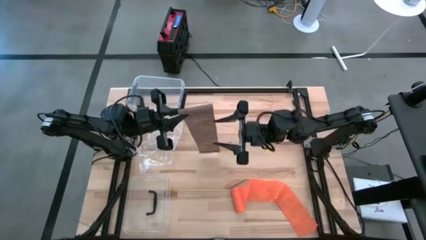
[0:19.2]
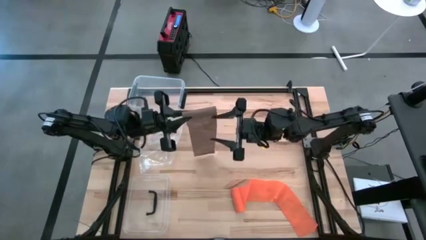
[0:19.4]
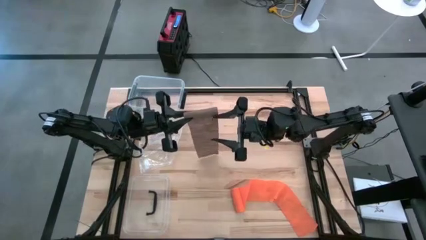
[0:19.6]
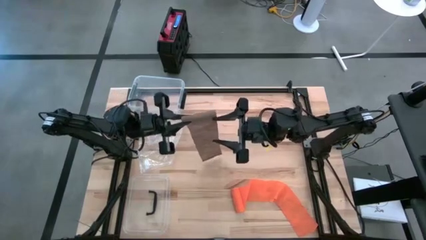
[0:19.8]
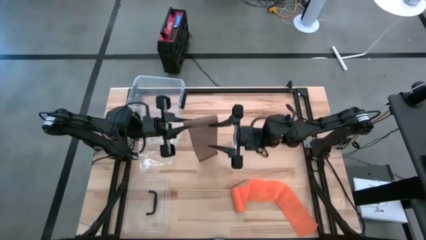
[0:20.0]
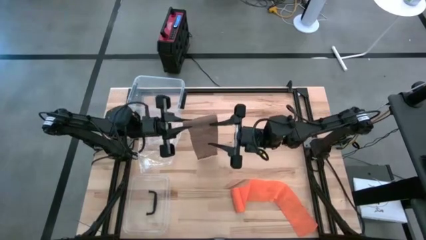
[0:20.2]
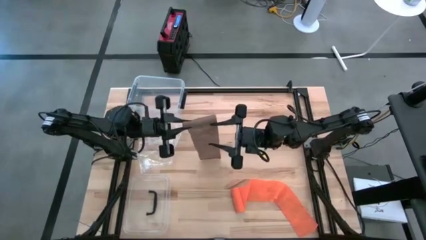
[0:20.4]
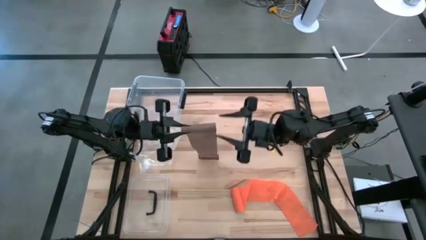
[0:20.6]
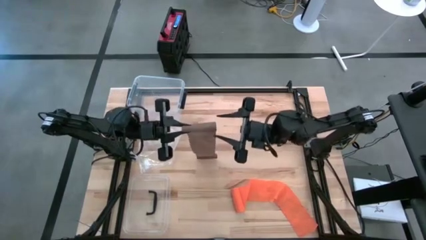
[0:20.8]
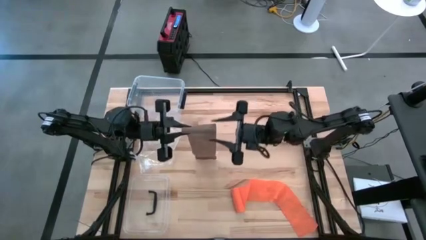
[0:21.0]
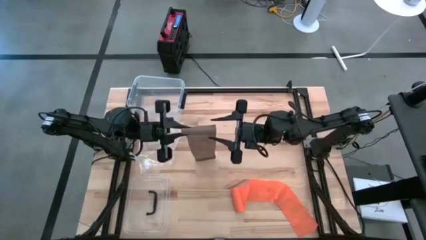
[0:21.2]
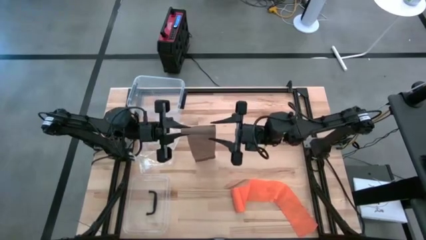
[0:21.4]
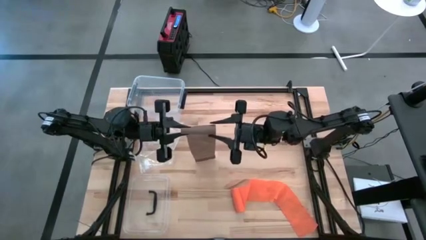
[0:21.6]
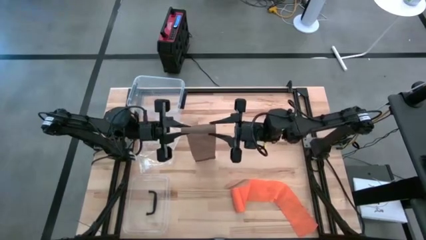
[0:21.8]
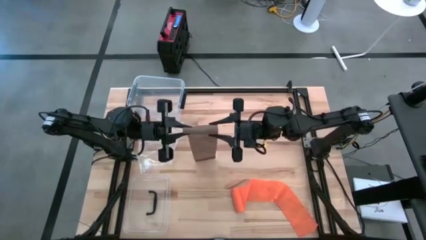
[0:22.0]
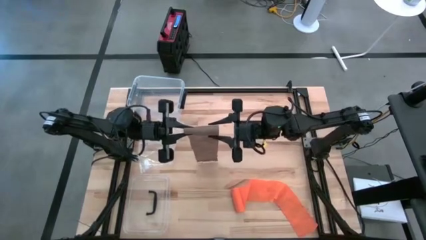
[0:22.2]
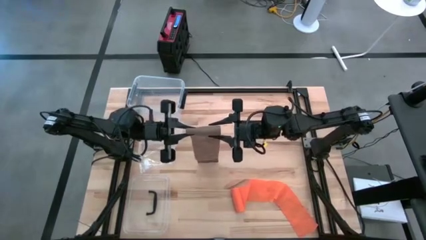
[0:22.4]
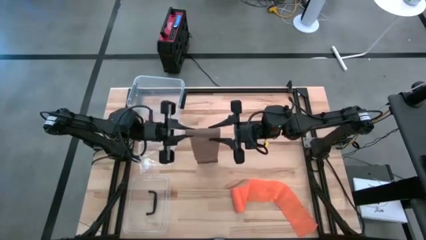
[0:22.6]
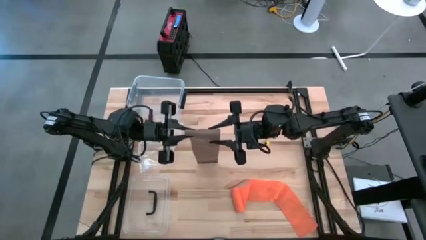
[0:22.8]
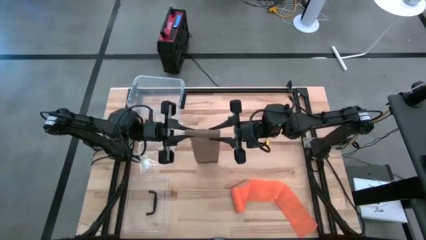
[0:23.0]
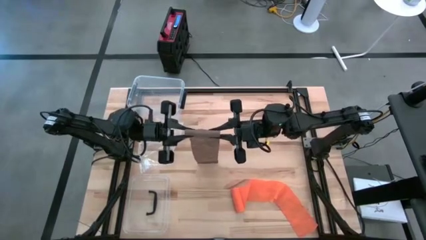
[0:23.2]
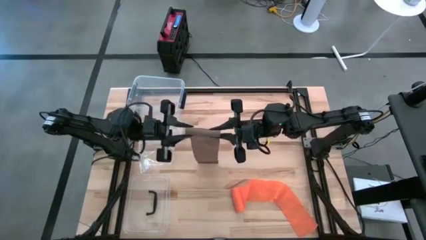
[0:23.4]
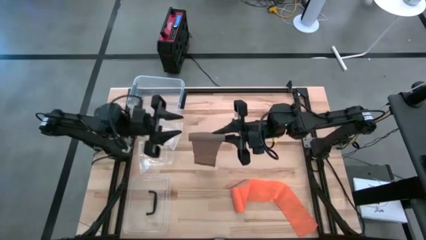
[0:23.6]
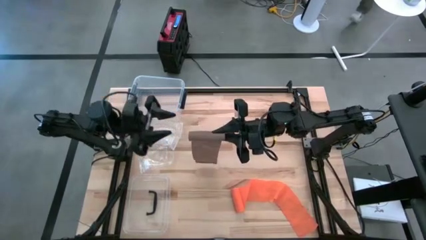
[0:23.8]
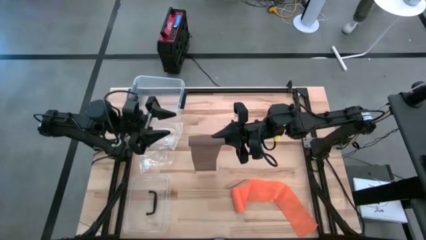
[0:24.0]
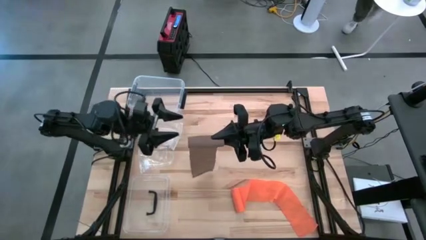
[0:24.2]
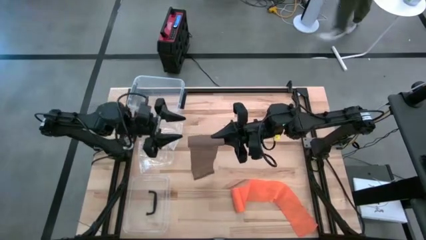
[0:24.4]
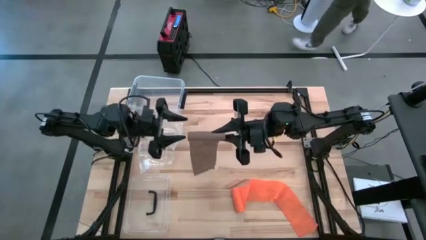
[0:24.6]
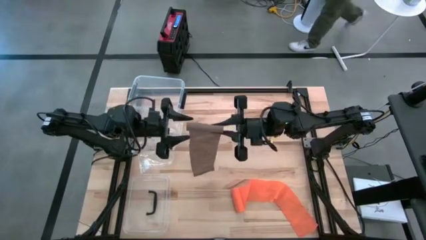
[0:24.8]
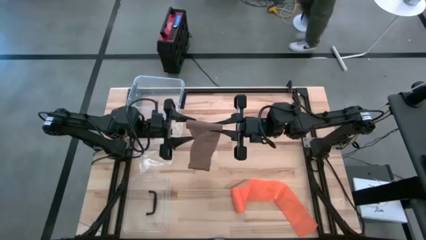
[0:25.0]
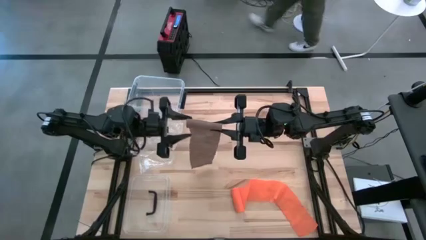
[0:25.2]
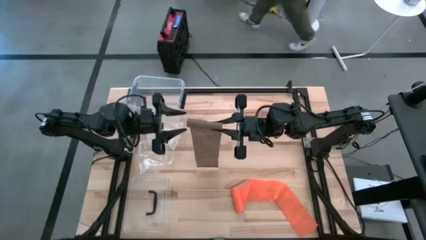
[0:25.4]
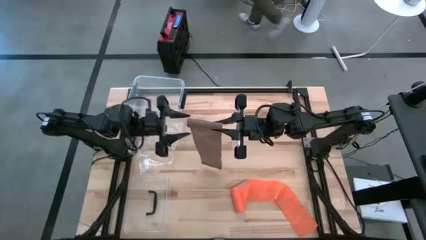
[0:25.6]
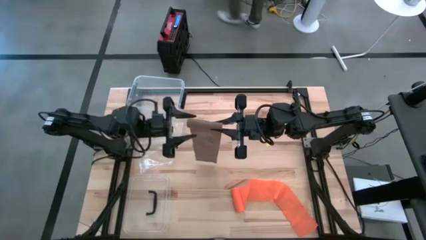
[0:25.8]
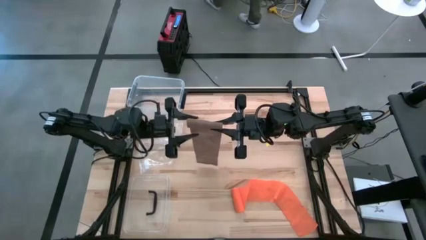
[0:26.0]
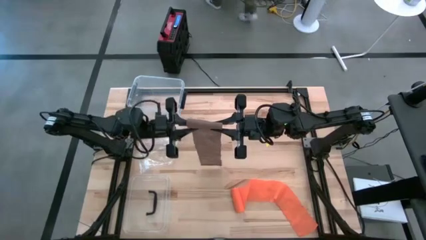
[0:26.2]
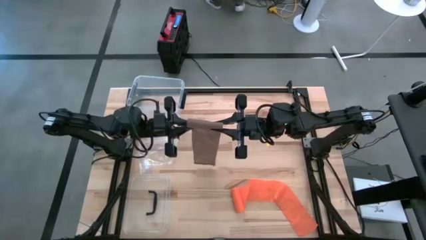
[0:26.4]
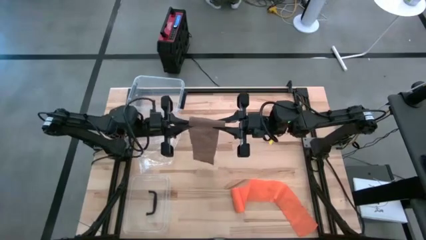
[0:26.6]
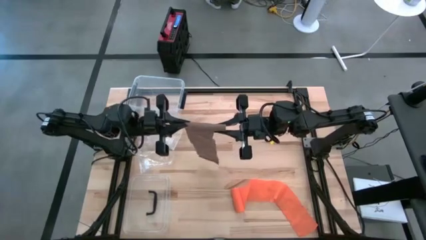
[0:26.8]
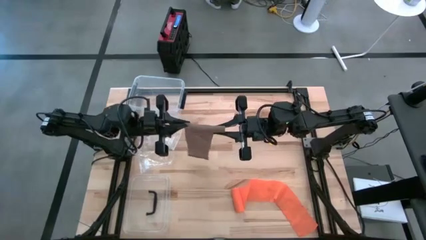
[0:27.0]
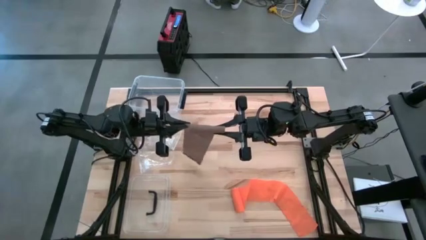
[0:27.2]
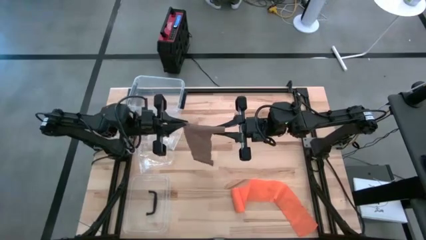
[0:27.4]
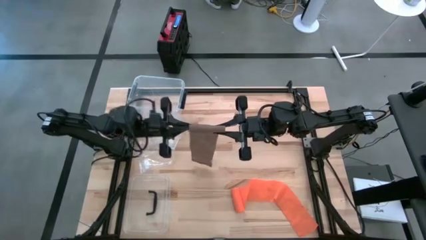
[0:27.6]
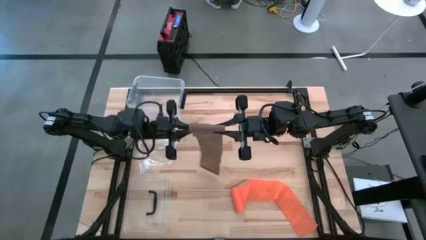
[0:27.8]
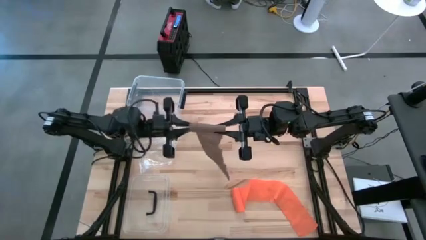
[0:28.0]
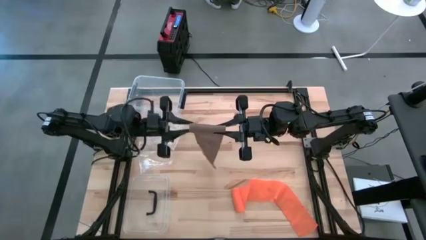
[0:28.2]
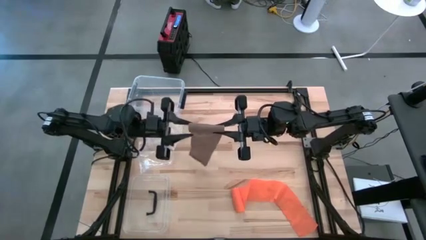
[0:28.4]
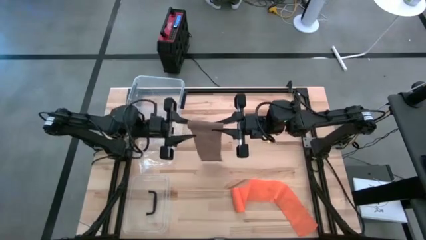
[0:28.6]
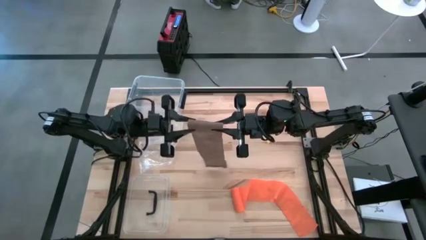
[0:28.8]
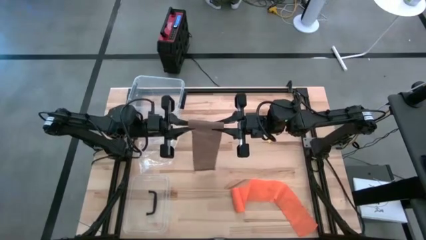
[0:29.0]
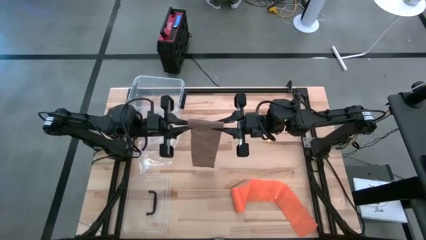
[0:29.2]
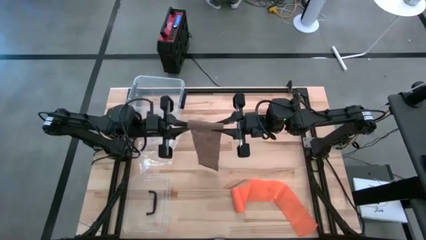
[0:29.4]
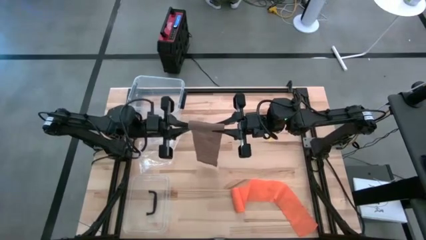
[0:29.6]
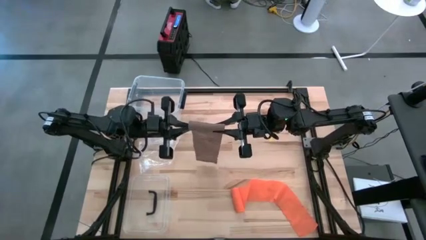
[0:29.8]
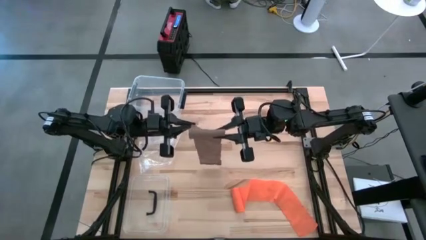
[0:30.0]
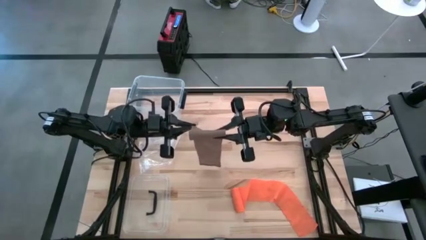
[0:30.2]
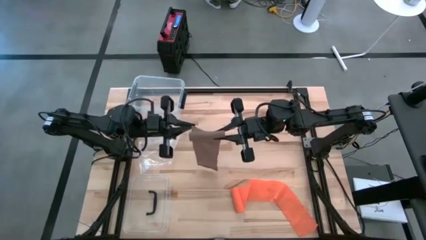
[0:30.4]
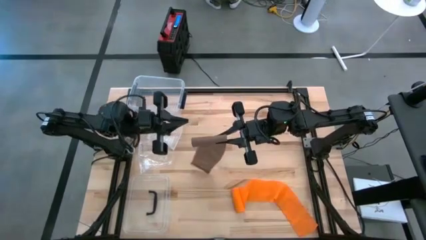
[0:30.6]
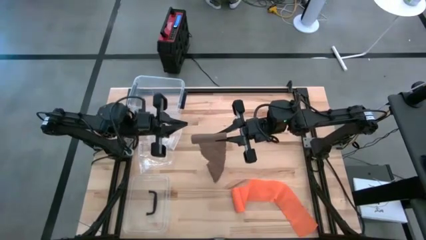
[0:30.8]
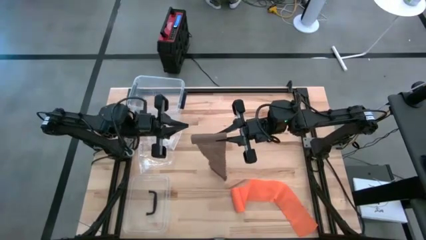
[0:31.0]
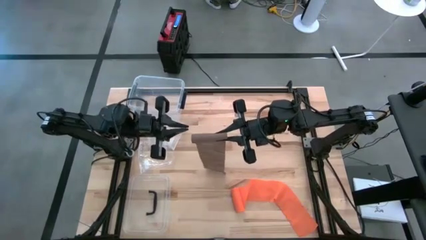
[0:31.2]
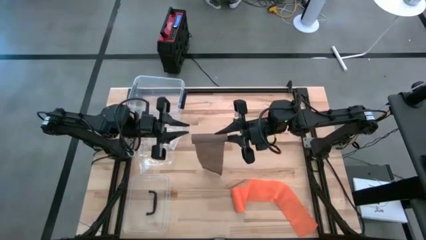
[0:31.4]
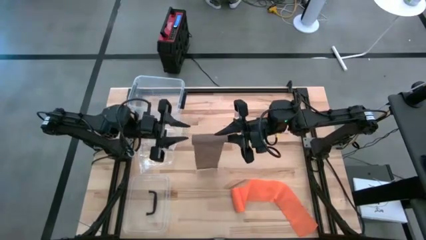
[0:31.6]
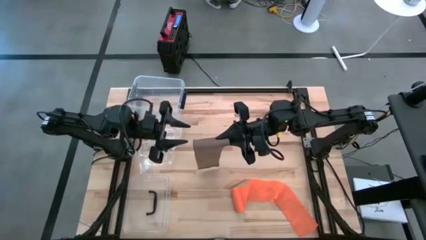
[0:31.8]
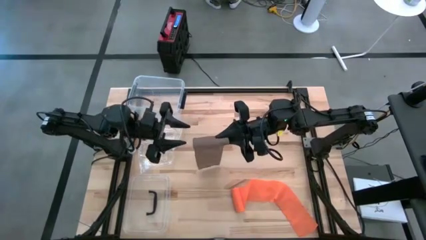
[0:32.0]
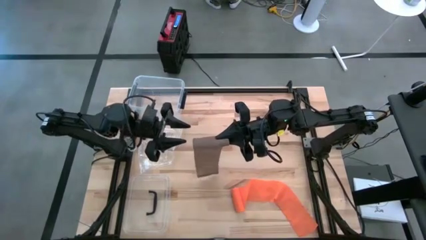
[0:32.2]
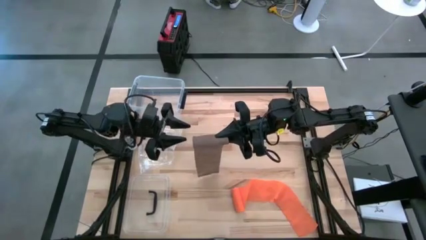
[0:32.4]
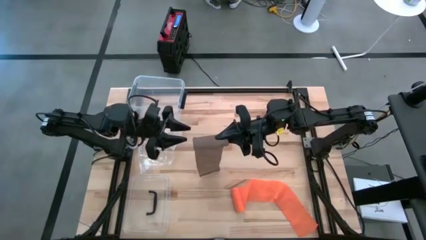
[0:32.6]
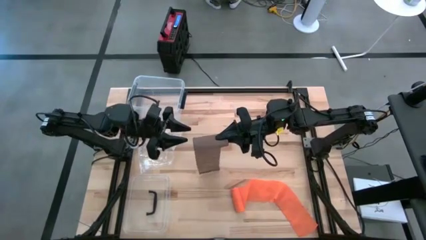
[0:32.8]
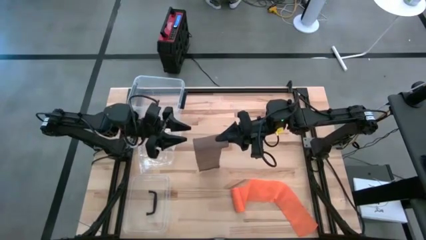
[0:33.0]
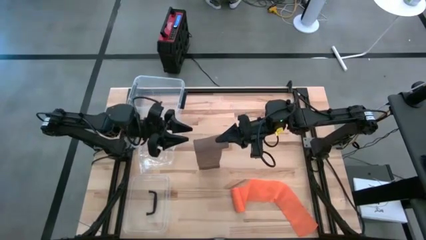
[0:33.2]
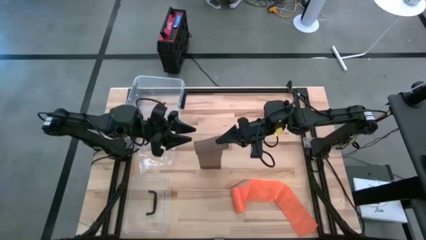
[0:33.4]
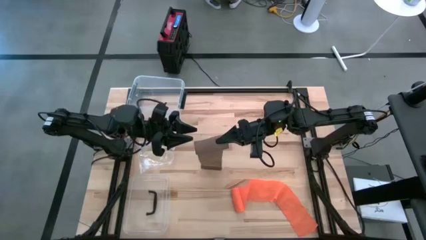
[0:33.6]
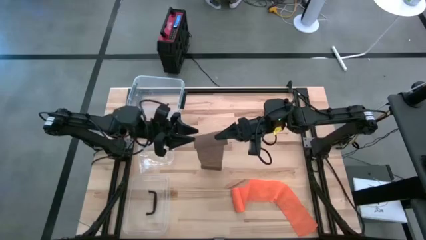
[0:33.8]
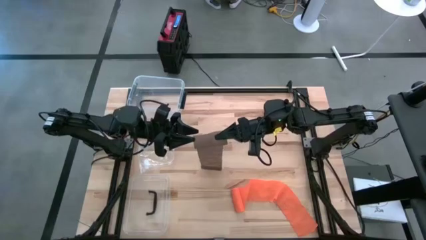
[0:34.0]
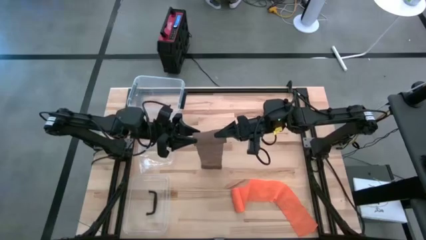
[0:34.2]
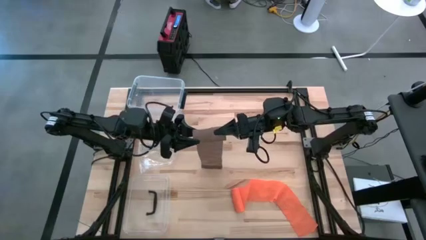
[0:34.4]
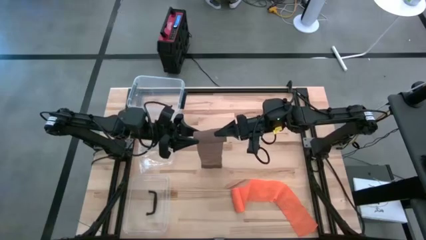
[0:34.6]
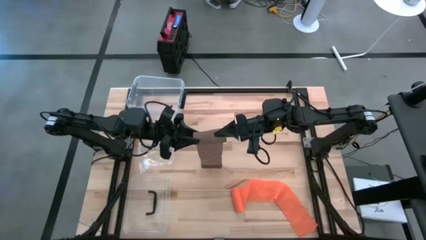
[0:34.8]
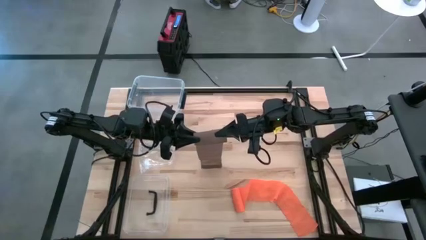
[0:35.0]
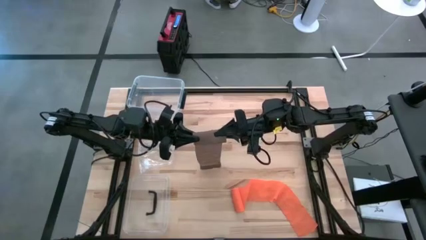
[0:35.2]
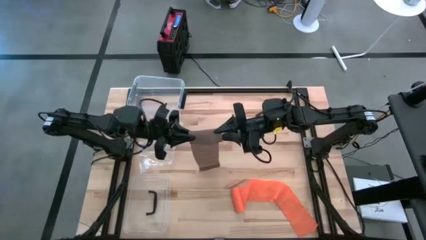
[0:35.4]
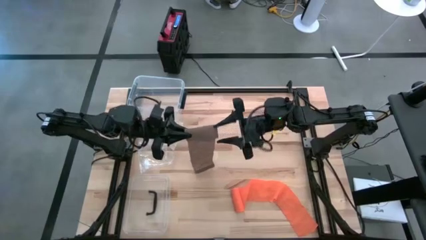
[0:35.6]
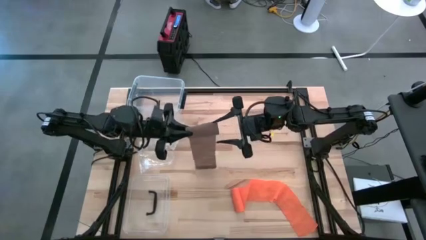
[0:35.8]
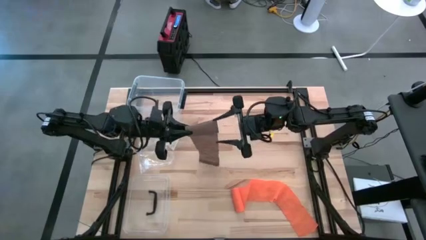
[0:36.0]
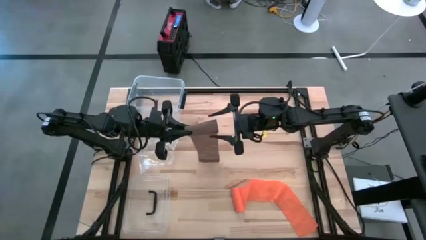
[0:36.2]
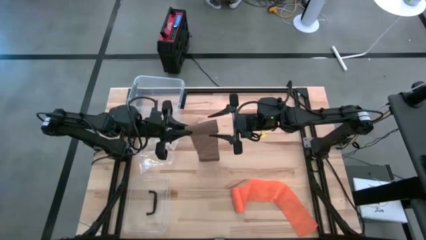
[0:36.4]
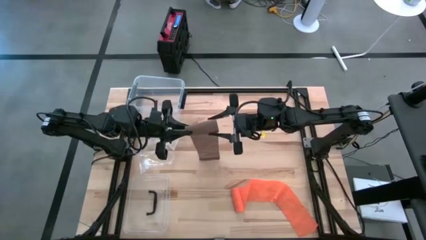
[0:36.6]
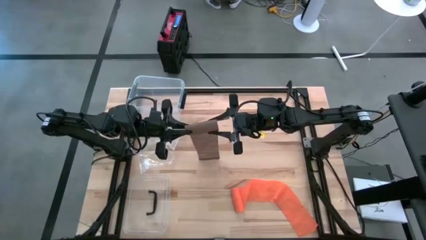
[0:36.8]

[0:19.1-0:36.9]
Task: Roll bandage
Roll the brown bandage
